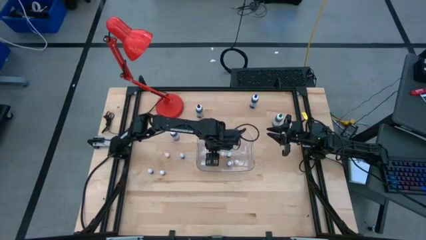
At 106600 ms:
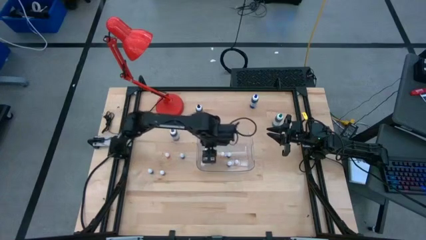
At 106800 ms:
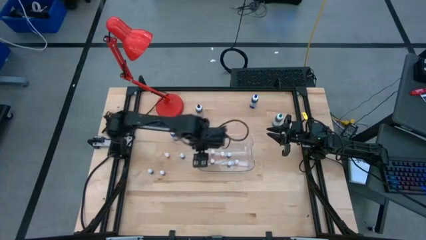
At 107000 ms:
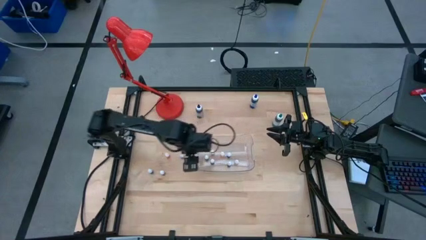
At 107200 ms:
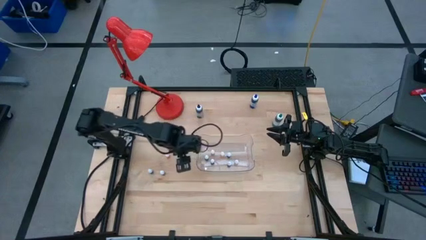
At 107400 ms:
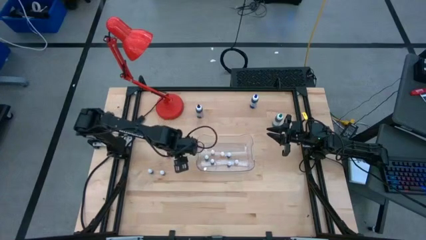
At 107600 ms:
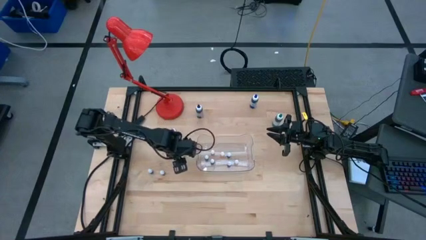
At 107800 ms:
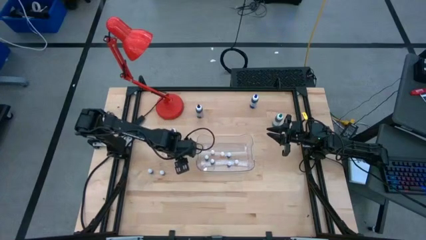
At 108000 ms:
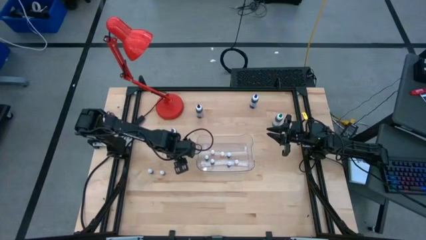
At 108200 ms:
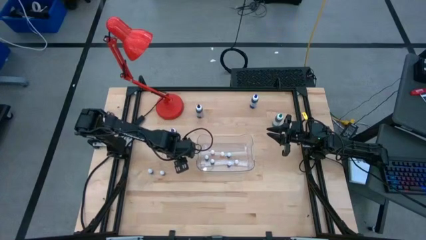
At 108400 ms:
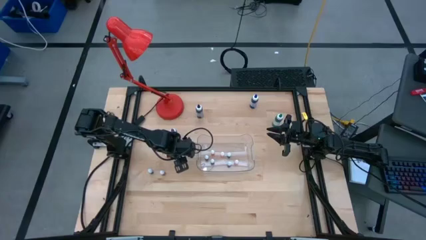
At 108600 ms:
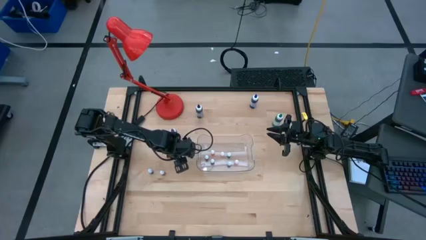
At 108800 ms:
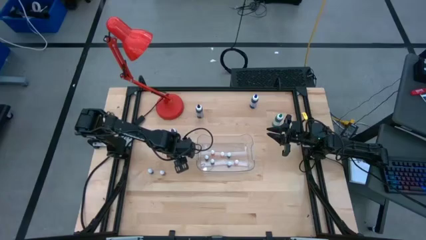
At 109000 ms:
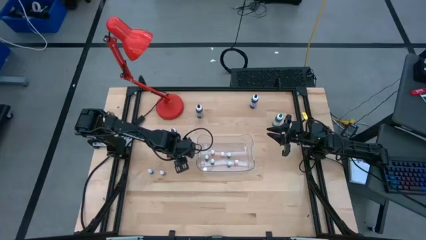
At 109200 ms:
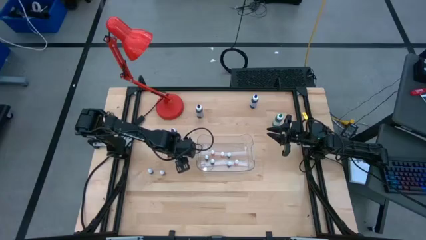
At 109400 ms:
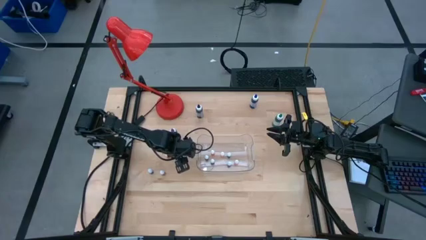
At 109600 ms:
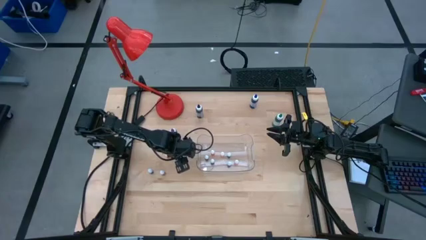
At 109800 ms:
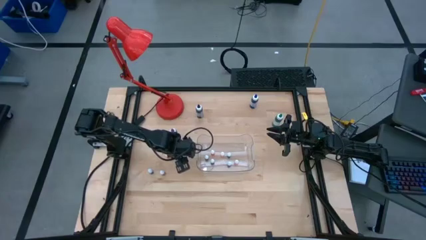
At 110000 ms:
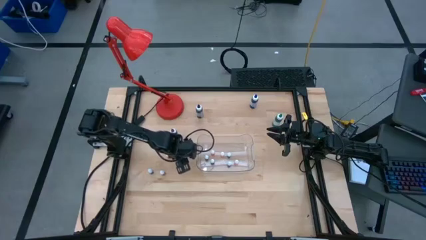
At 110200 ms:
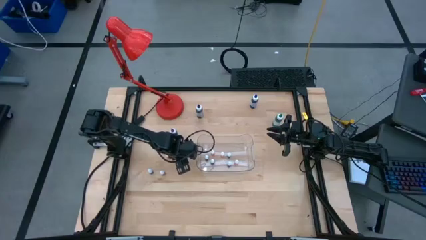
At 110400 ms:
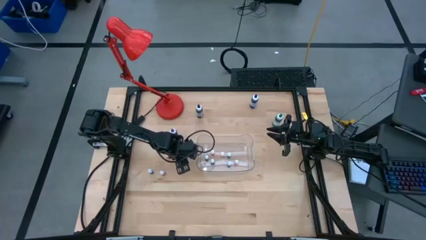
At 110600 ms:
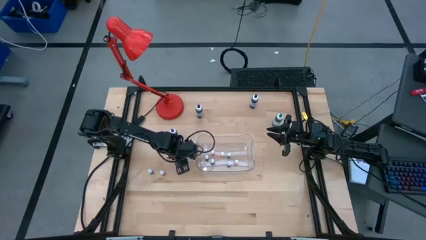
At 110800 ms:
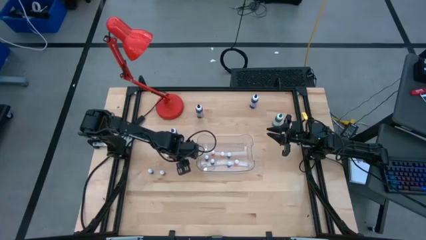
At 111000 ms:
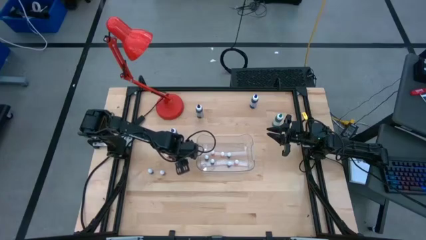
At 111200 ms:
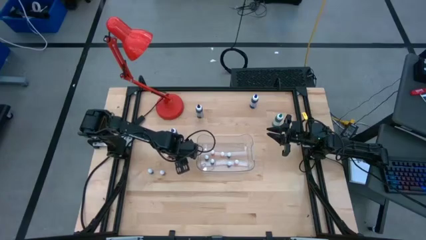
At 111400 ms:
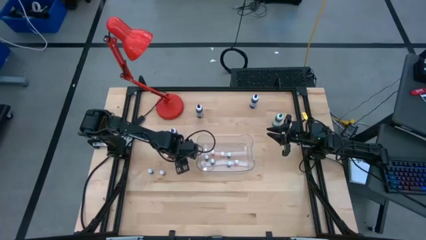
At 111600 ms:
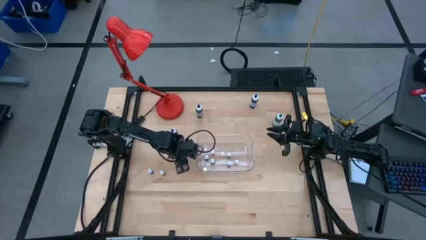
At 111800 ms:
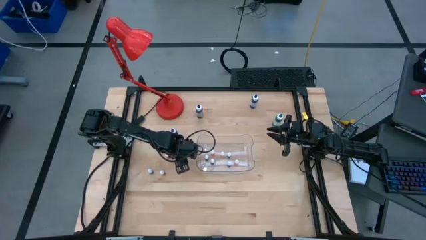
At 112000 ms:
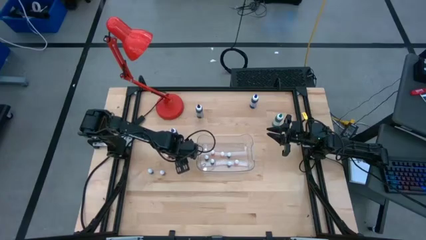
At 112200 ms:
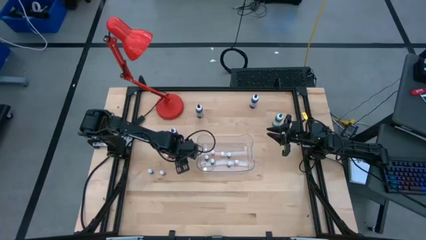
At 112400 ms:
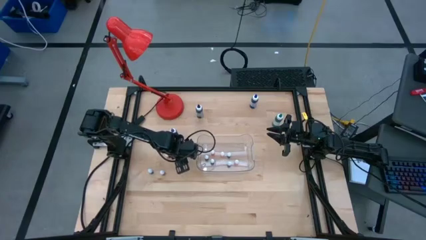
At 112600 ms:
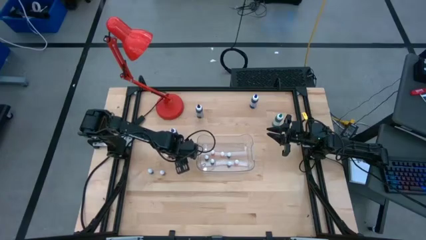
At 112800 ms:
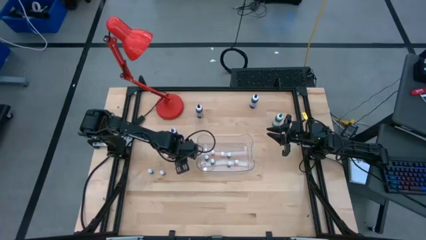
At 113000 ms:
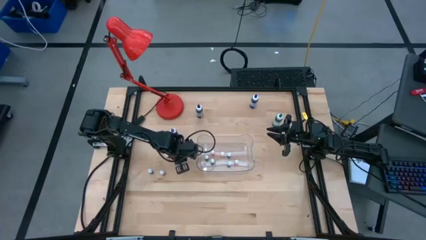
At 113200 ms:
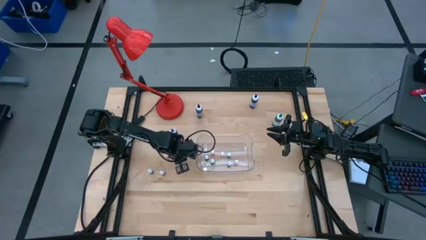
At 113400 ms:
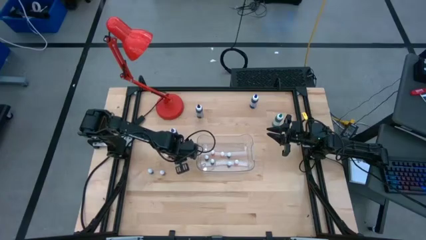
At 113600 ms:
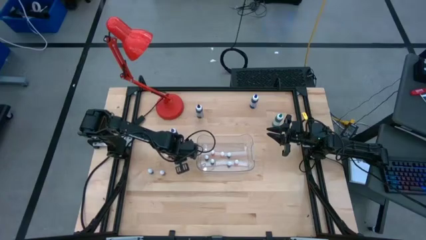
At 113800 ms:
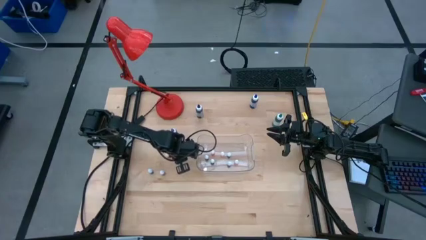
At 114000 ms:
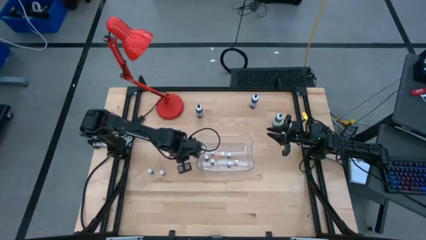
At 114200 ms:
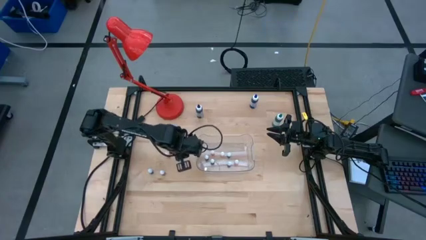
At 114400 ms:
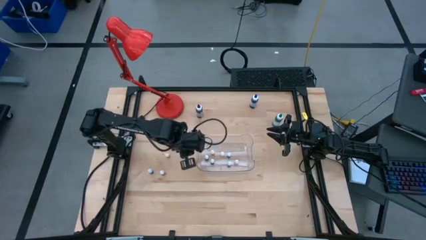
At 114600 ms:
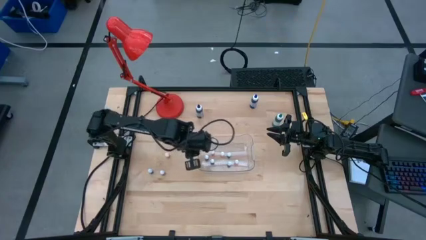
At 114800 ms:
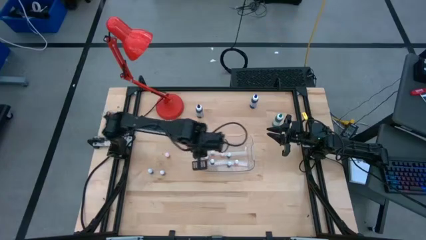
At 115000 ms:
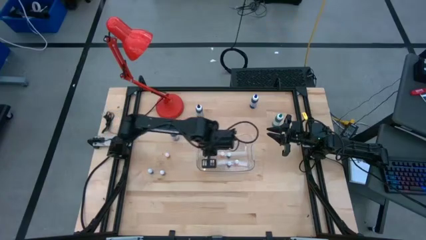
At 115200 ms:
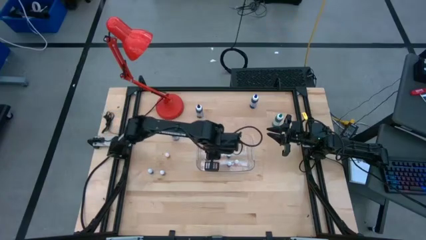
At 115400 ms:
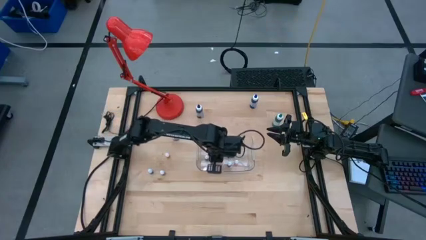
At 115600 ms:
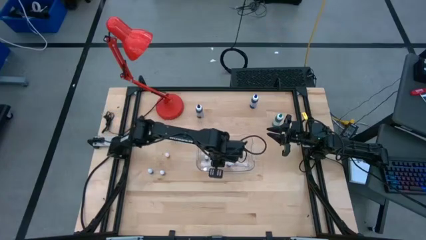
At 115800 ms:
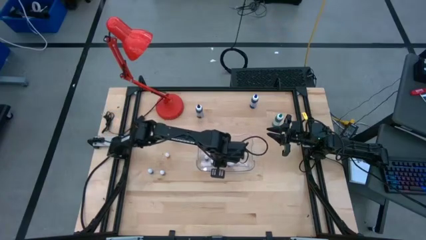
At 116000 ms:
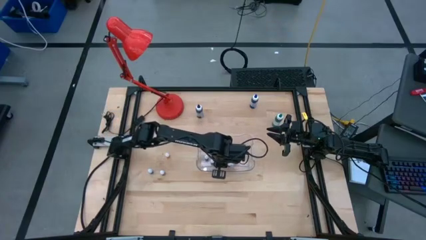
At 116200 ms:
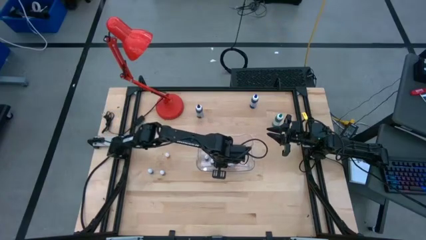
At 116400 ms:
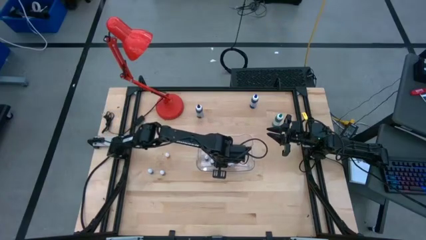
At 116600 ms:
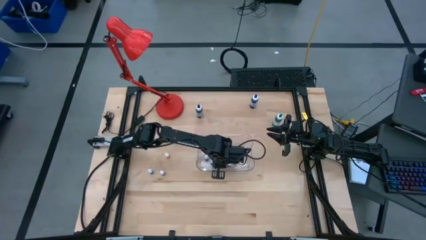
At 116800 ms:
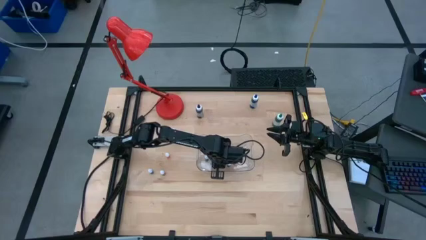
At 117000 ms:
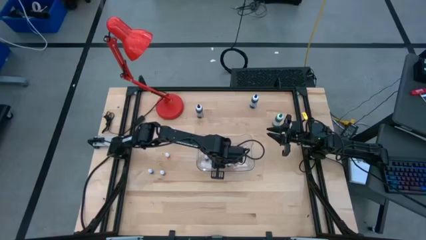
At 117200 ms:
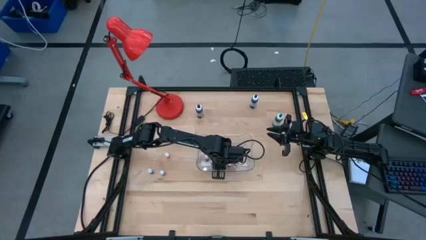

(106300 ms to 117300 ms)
Task: Pick & Place food coloring
Put the small green food coloring bottle into the transparent bin

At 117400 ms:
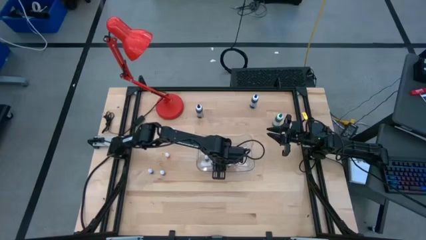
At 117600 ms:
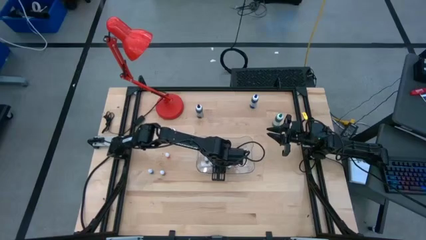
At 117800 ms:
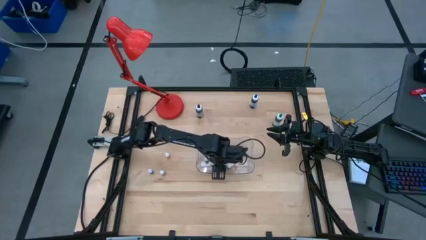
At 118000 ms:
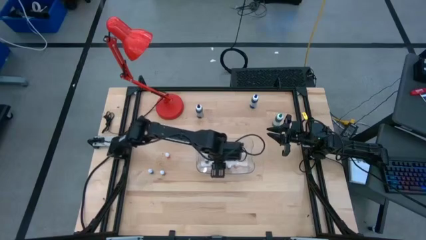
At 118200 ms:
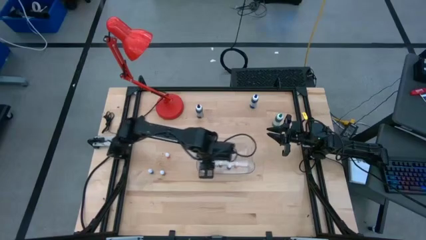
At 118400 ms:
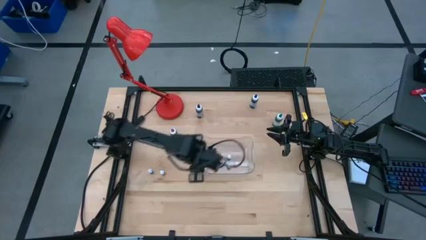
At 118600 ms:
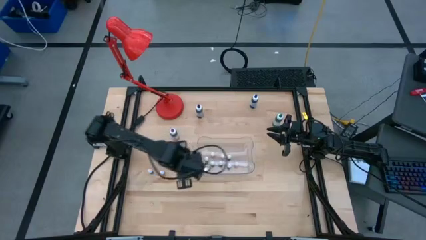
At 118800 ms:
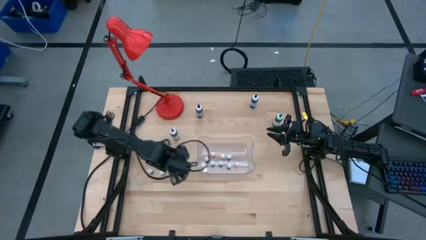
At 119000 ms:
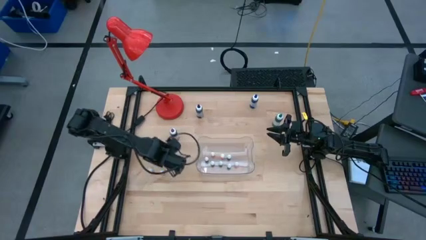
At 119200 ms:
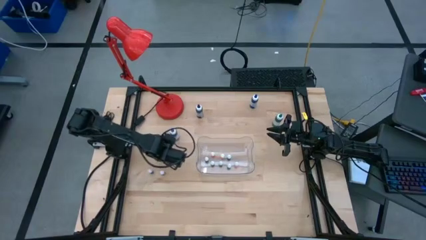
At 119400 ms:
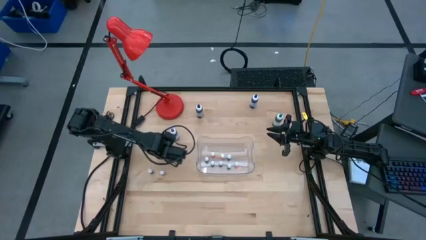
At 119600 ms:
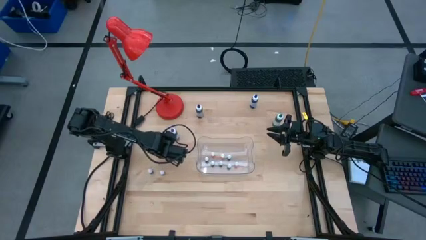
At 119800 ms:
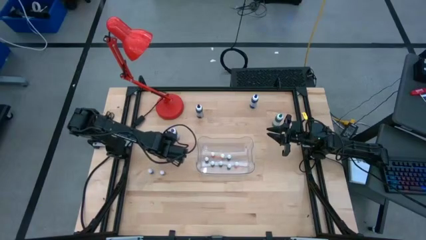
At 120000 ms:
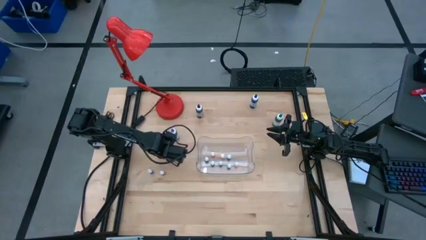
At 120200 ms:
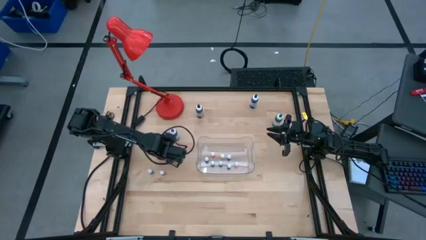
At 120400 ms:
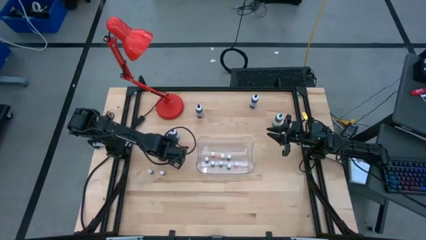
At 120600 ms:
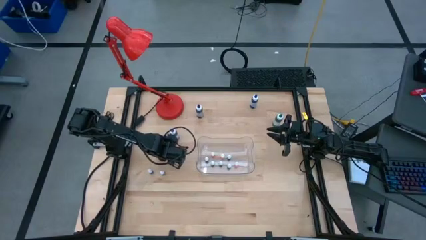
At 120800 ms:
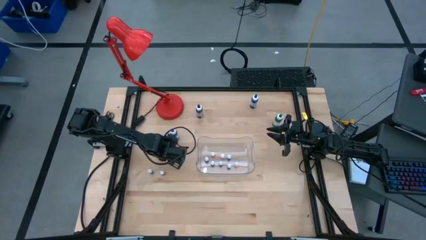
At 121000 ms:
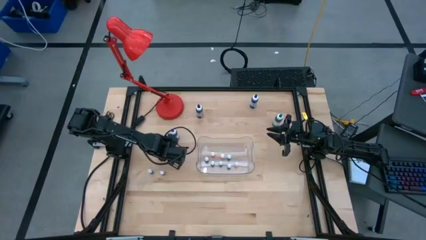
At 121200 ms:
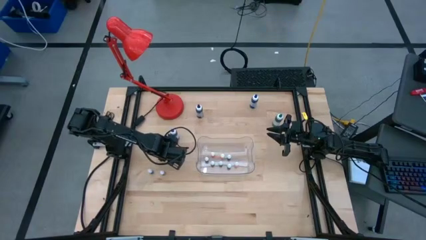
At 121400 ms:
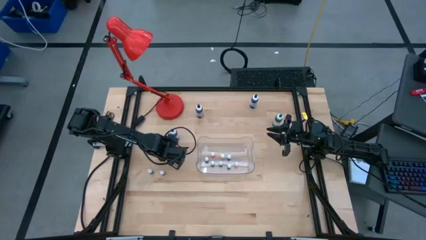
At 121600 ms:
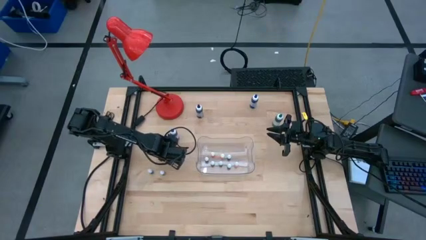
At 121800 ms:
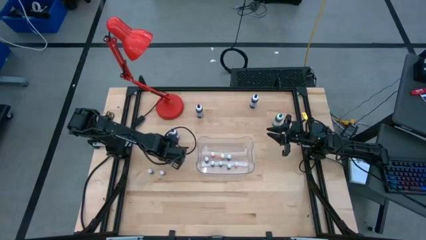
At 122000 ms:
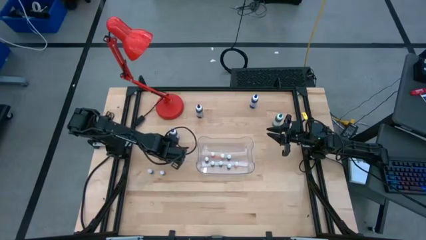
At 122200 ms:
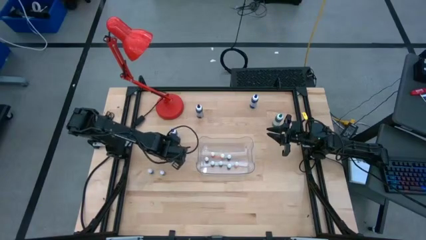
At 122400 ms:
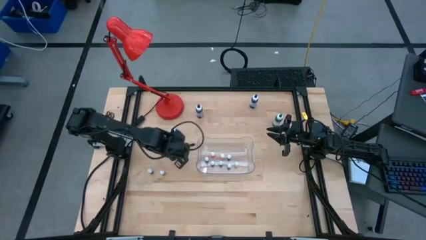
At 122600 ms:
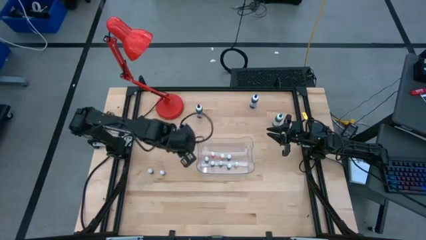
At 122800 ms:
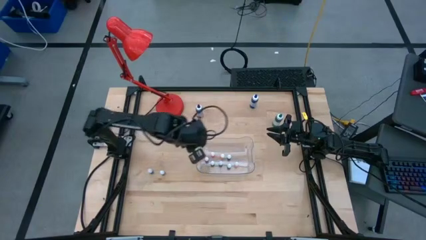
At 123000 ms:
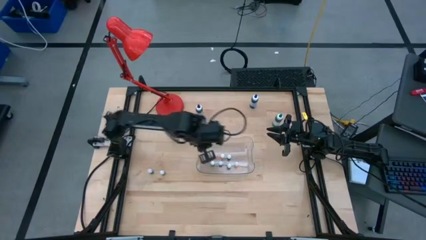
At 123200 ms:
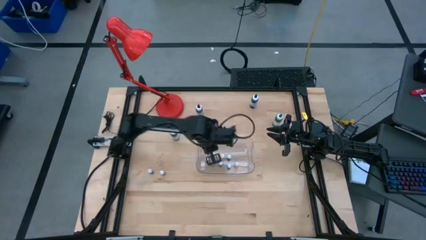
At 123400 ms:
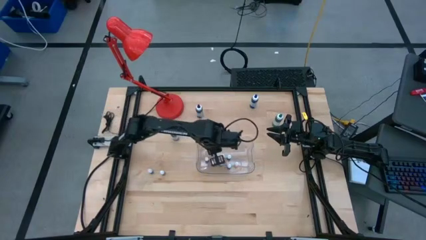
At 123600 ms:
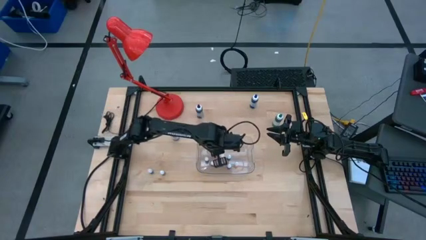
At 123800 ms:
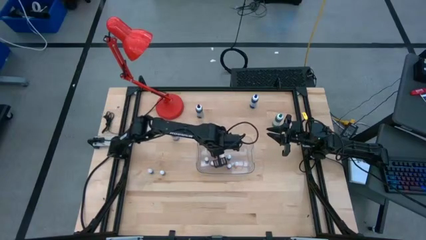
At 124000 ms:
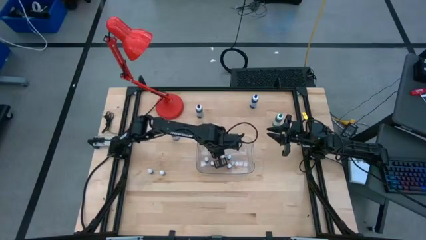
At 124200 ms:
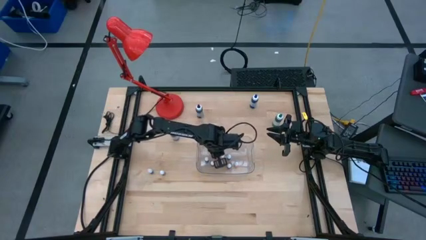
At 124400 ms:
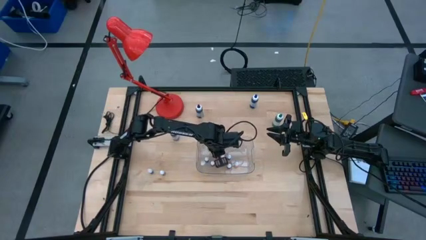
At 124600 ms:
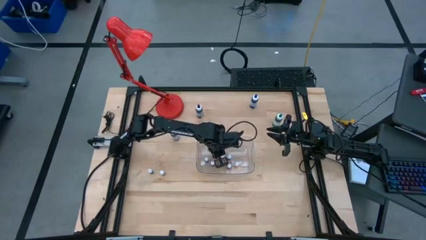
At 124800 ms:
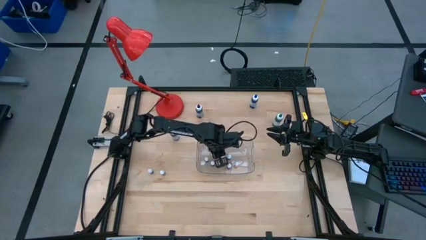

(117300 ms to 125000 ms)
Put the small orange food coloring bottle into the transparent bin
